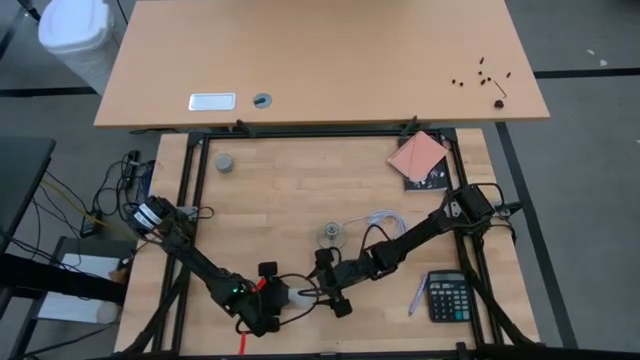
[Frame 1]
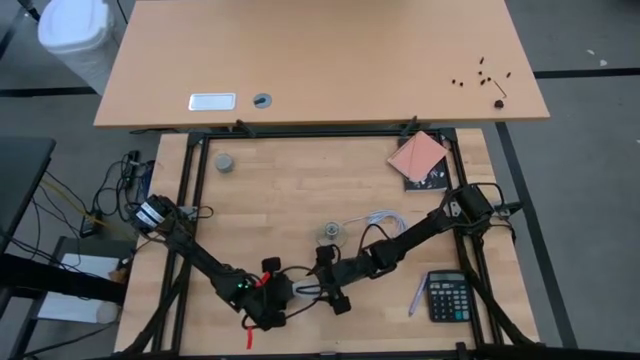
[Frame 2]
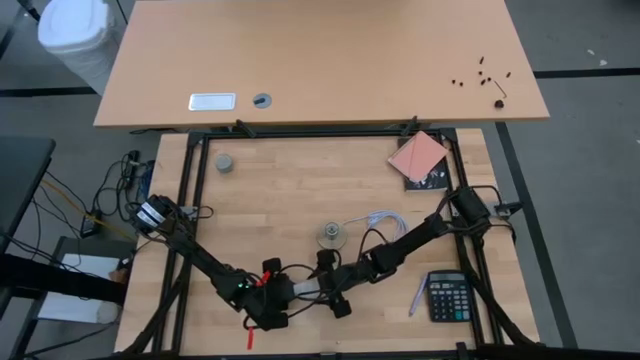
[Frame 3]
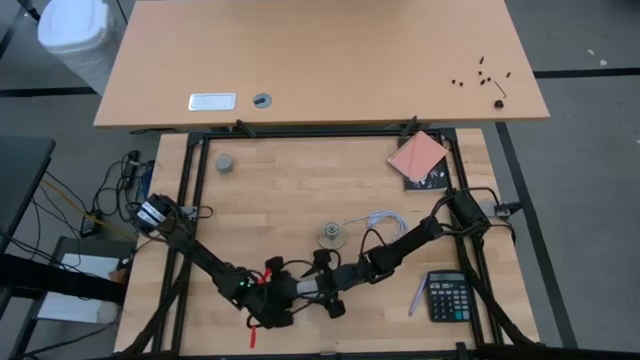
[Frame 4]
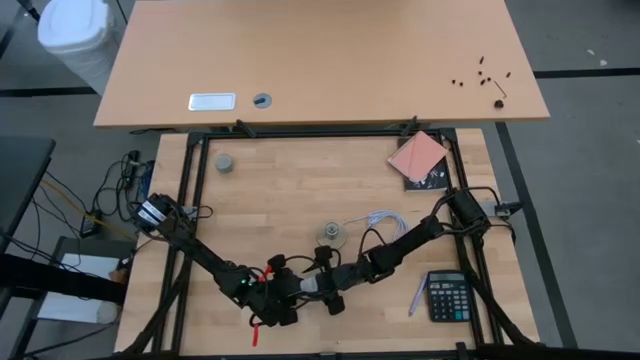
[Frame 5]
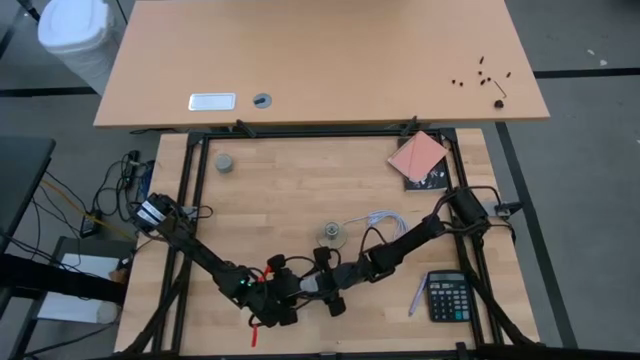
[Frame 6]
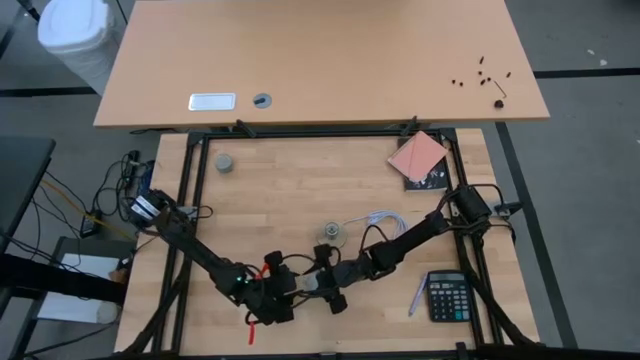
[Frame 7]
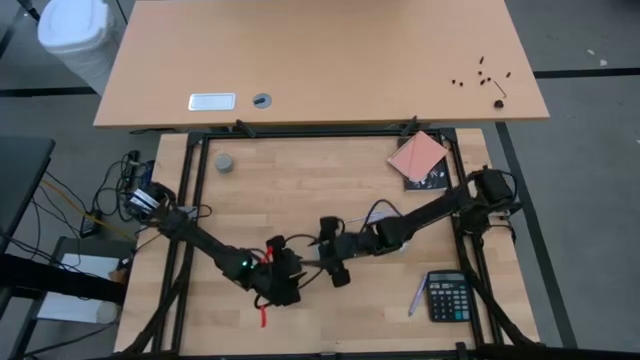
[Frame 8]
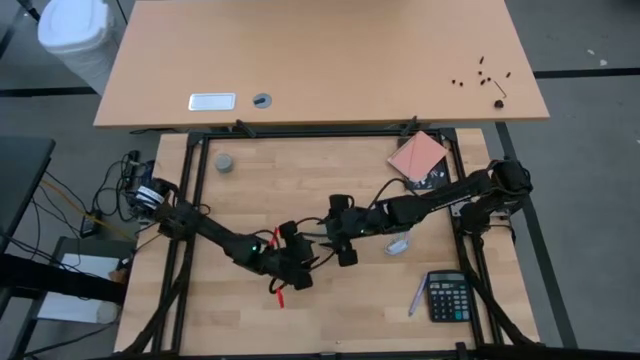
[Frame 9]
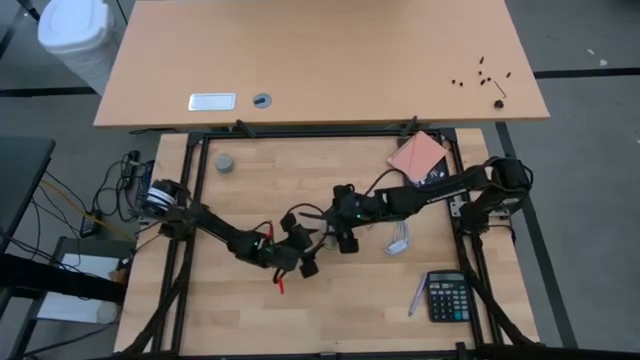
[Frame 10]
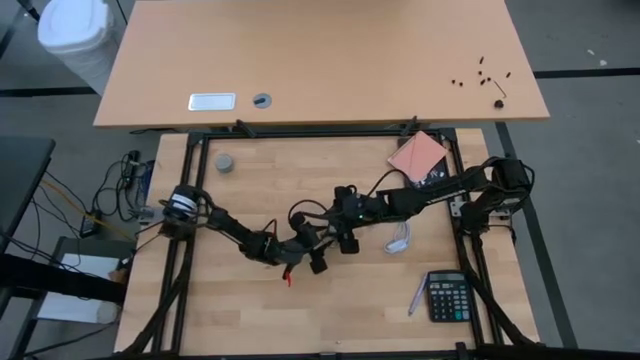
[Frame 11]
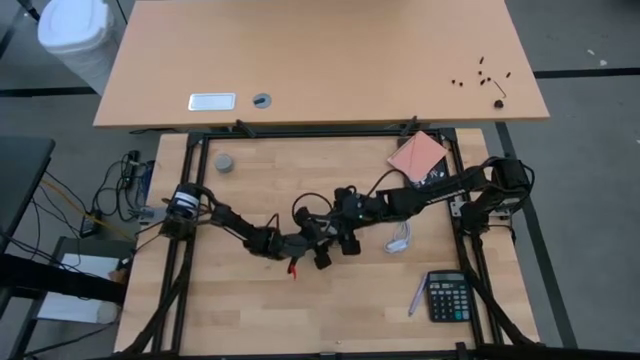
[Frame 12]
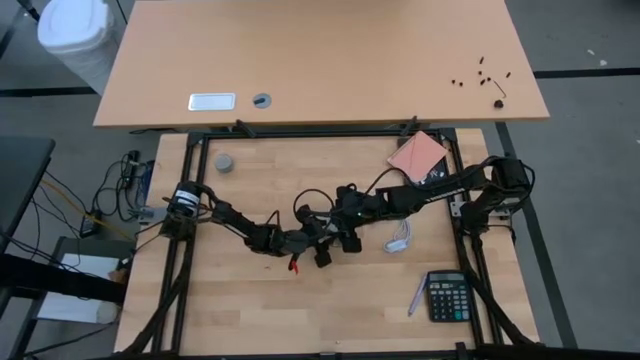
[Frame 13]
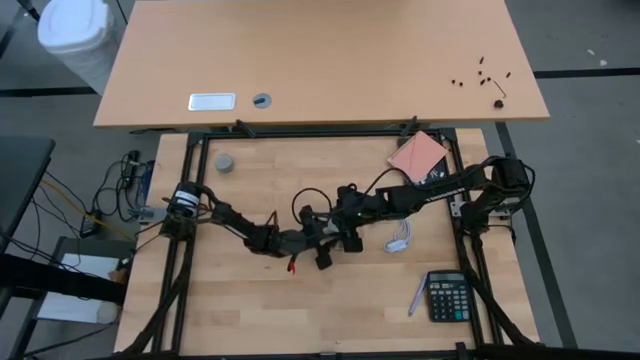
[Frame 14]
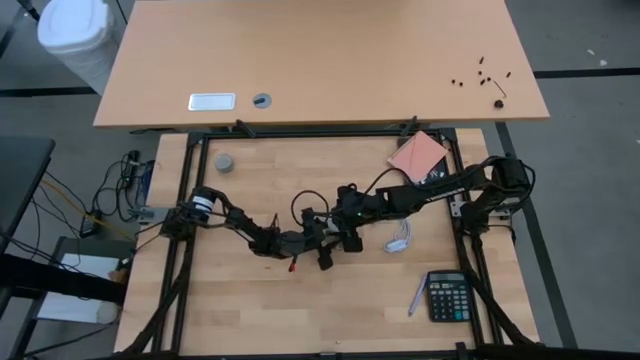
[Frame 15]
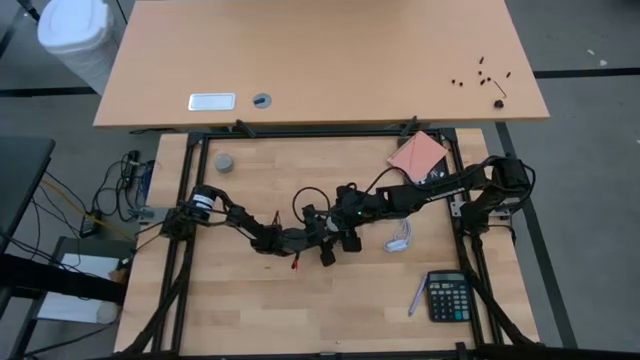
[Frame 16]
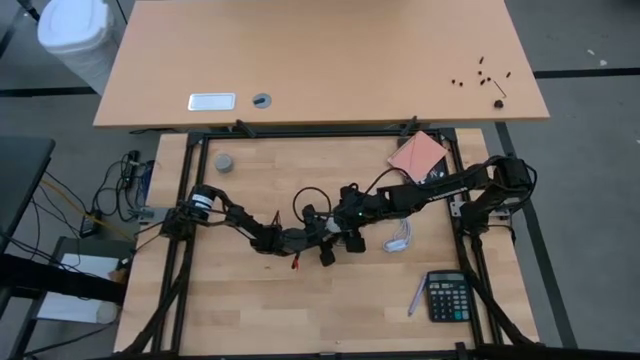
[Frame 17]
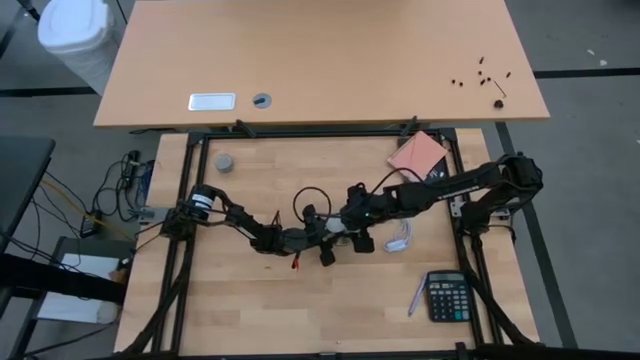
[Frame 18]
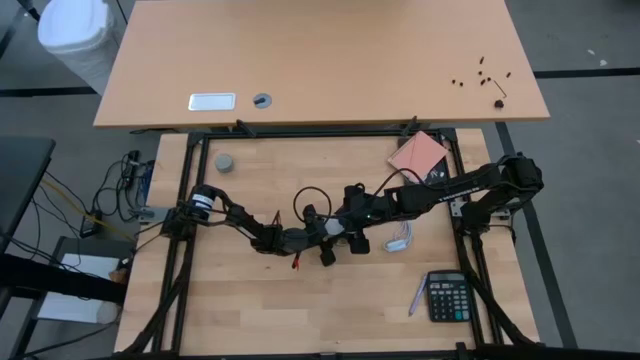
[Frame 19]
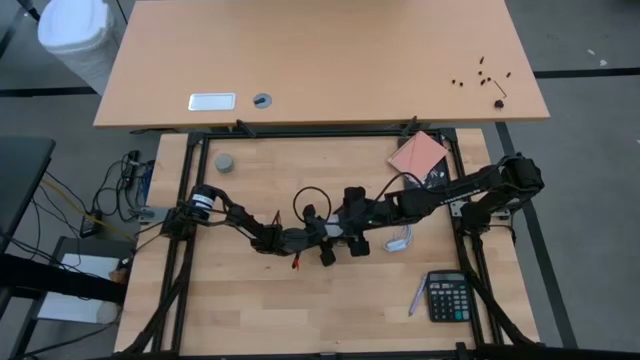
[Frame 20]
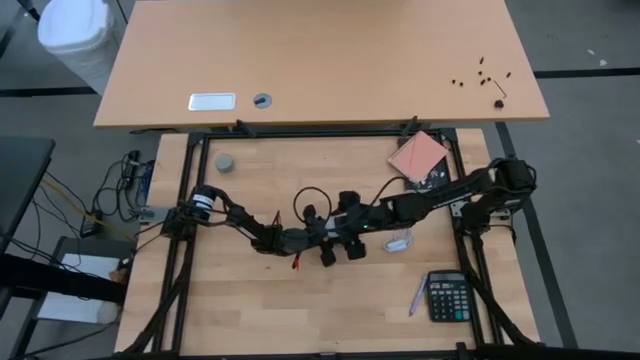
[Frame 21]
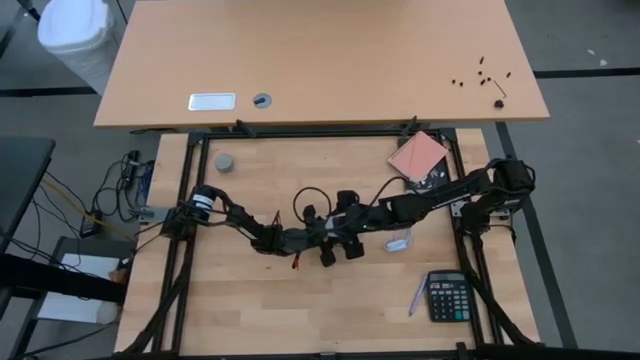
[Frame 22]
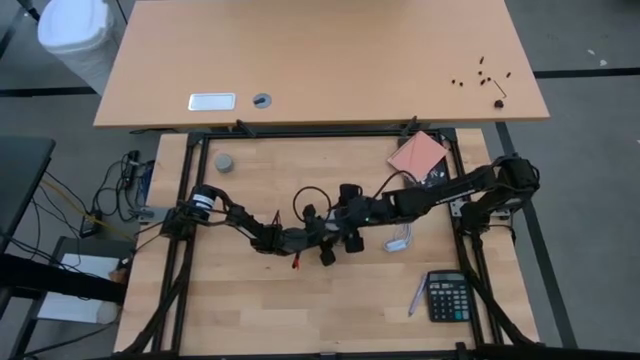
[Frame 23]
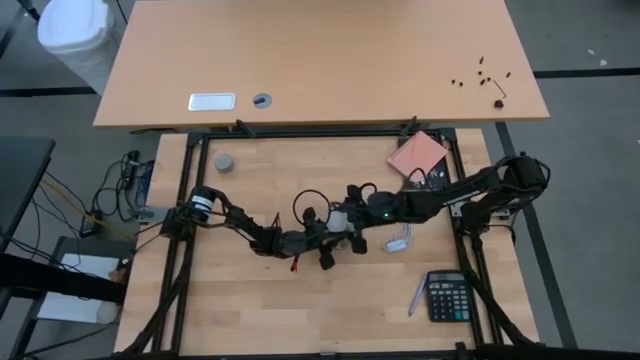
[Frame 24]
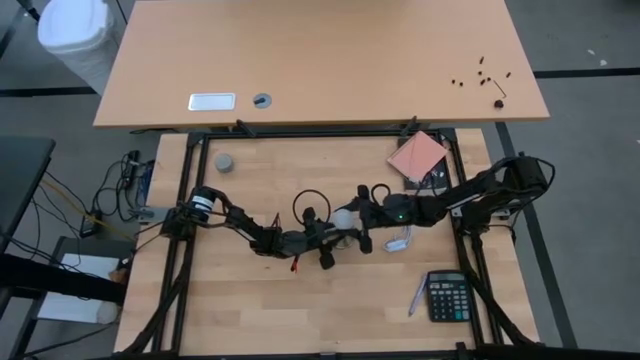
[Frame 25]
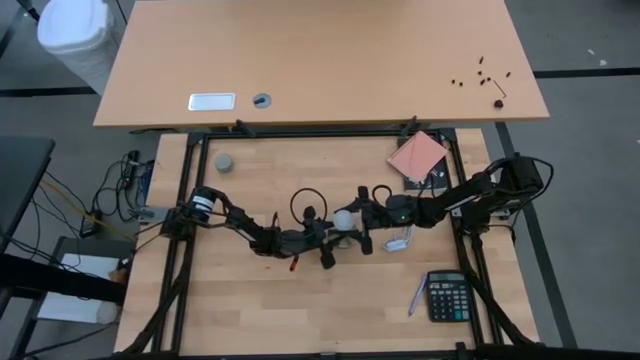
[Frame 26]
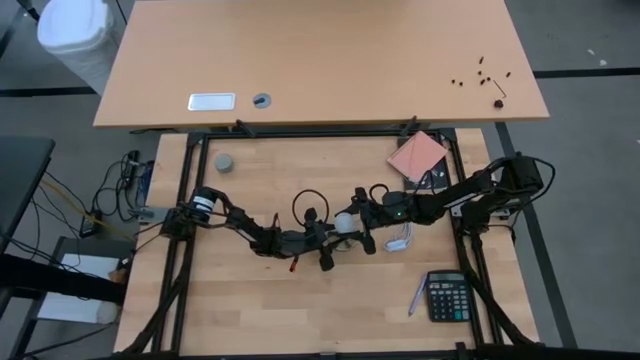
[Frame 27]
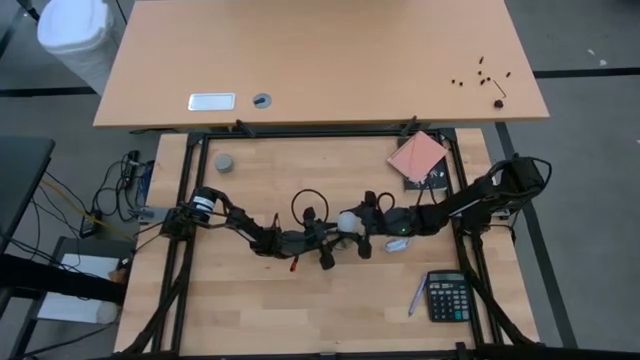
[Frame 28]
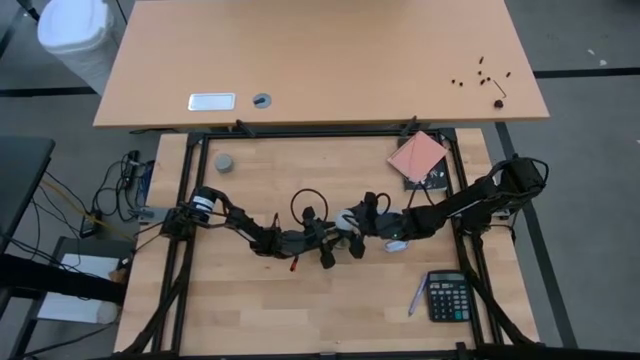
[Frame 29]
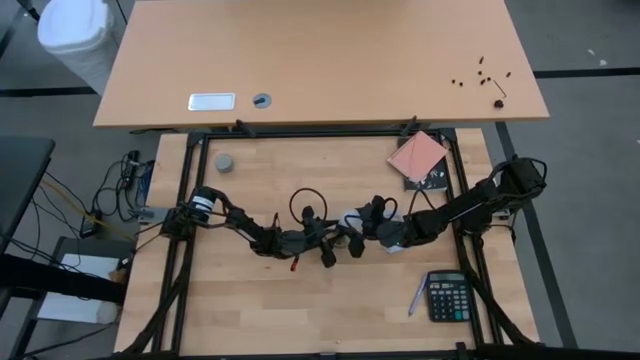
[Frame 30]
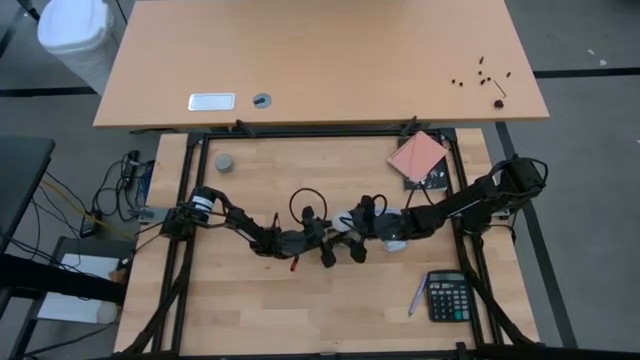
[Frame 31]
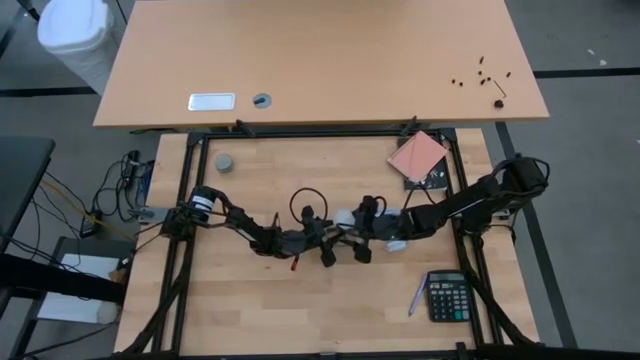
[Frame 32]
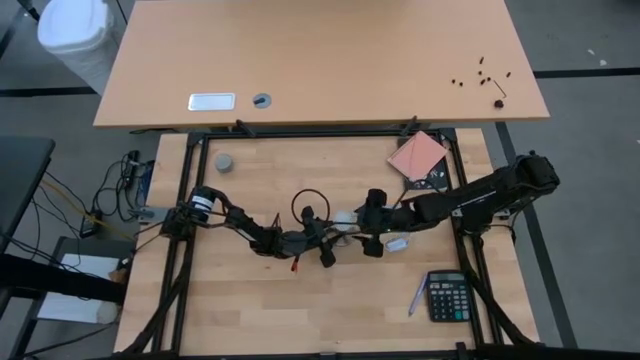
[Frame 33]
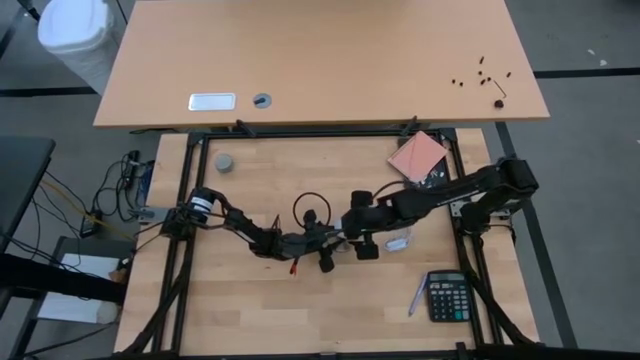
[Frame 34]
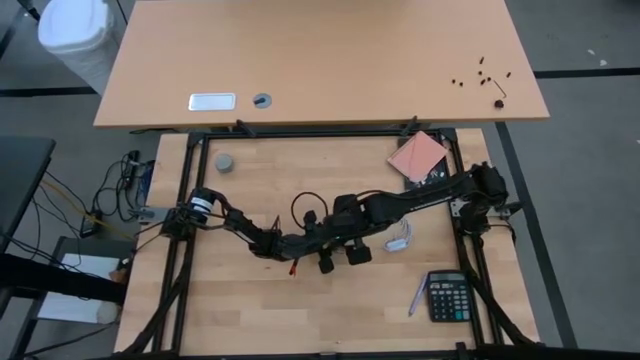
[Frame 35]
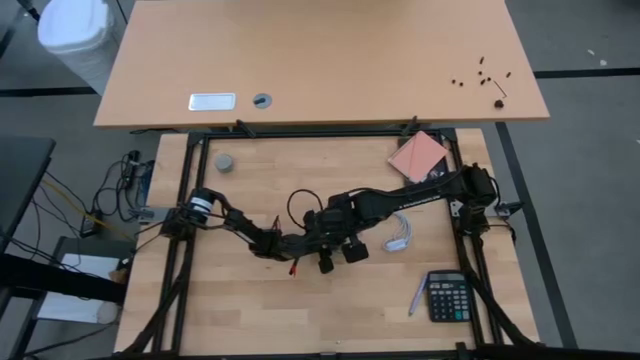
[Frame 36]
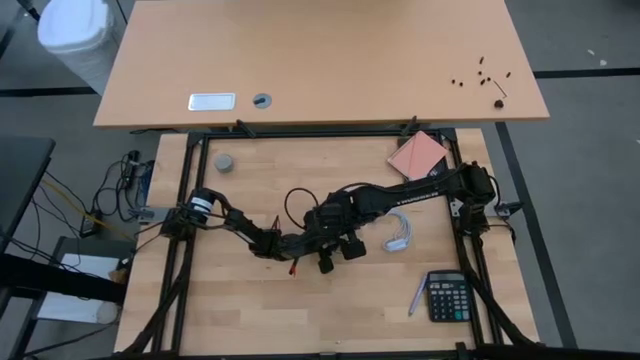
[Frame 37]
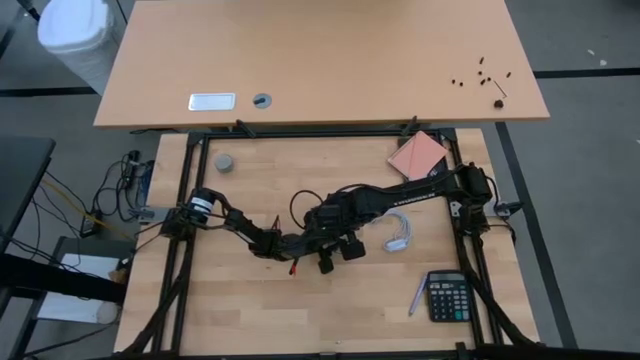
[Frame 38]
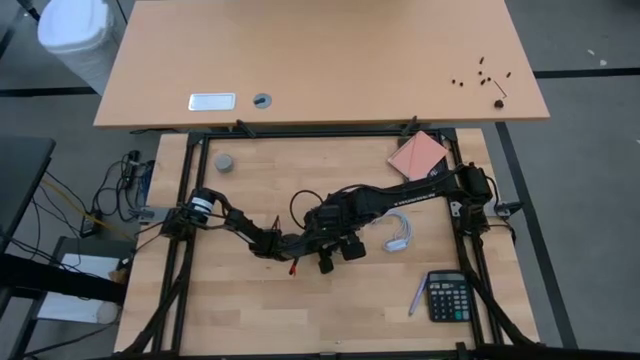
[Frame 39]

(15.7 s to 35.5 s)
Task: Screw lightbulb
Insert the white lightbulb into the golden lamp
